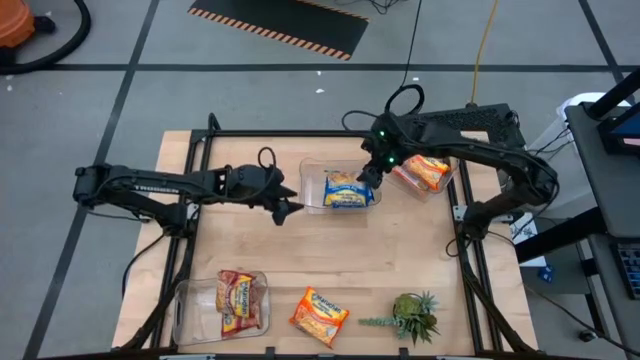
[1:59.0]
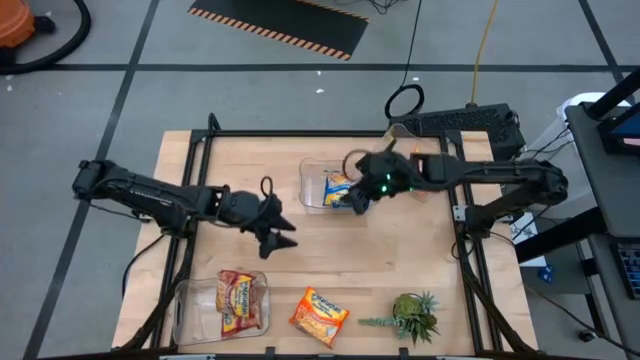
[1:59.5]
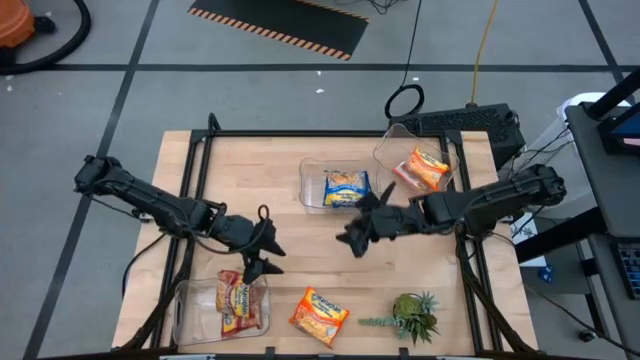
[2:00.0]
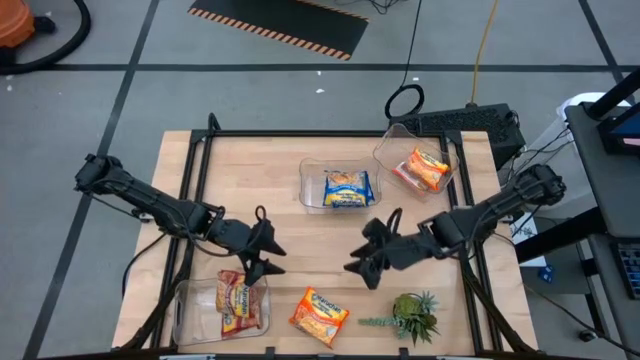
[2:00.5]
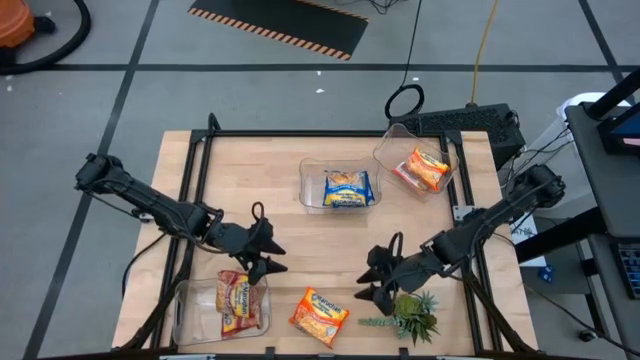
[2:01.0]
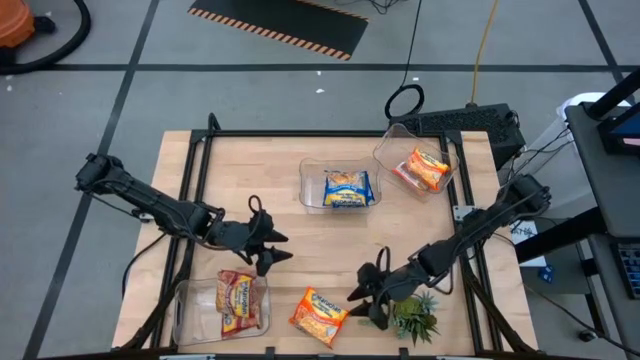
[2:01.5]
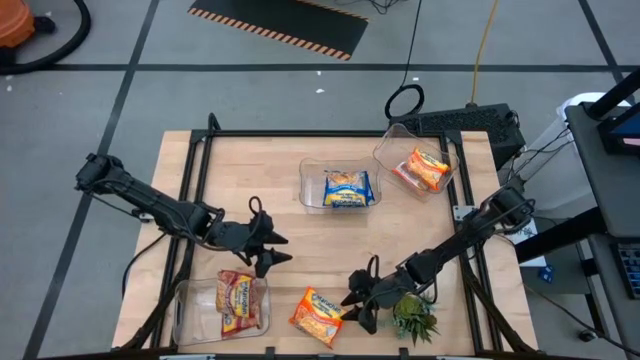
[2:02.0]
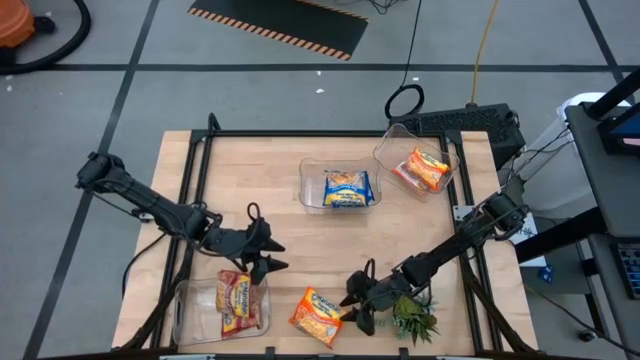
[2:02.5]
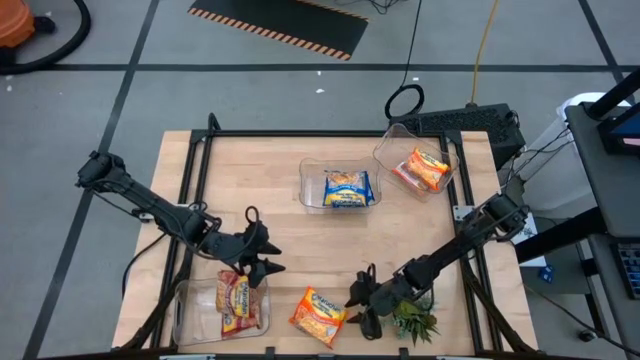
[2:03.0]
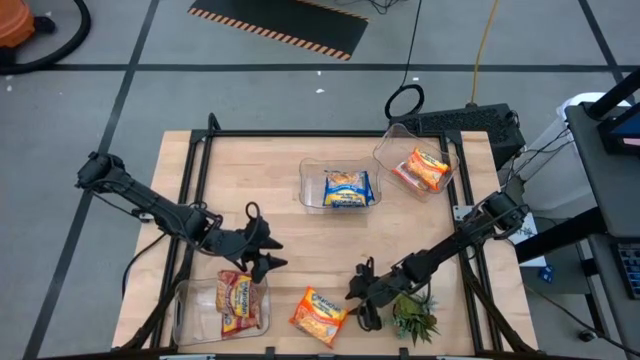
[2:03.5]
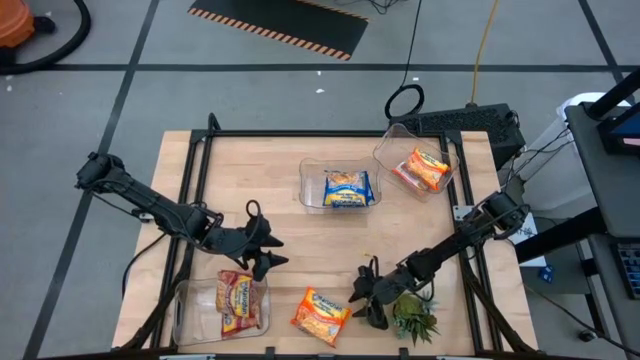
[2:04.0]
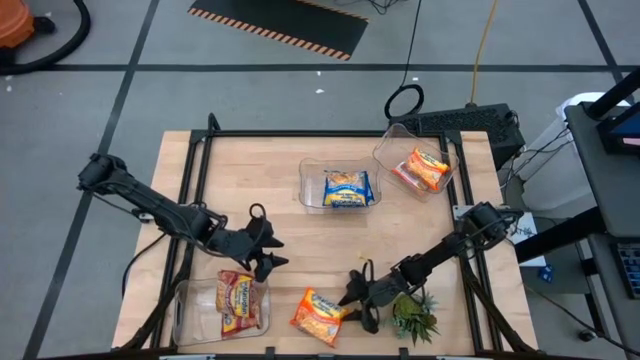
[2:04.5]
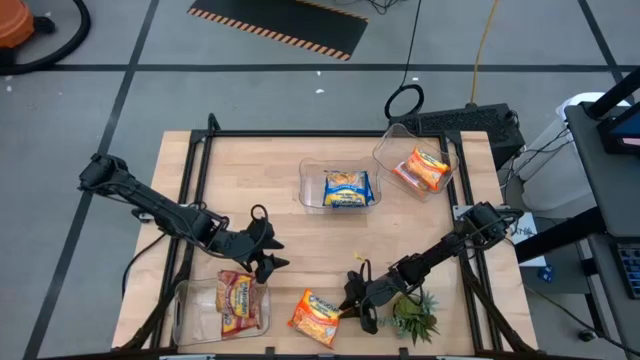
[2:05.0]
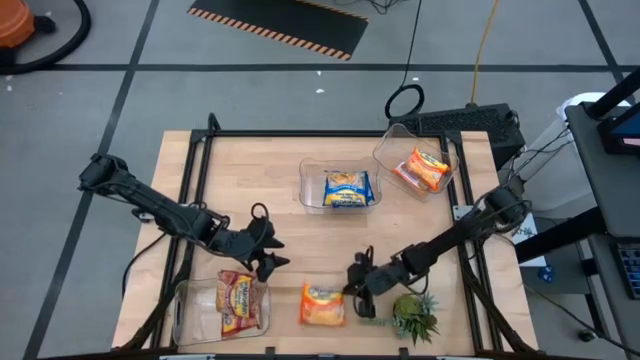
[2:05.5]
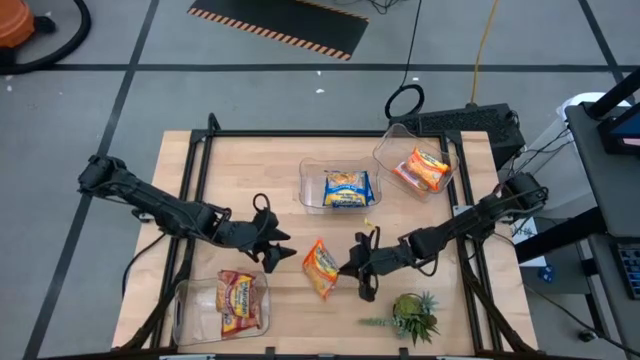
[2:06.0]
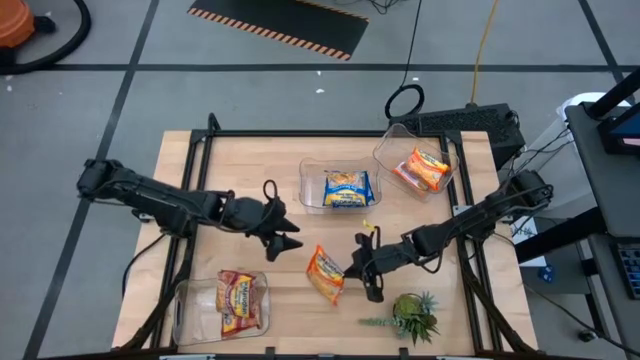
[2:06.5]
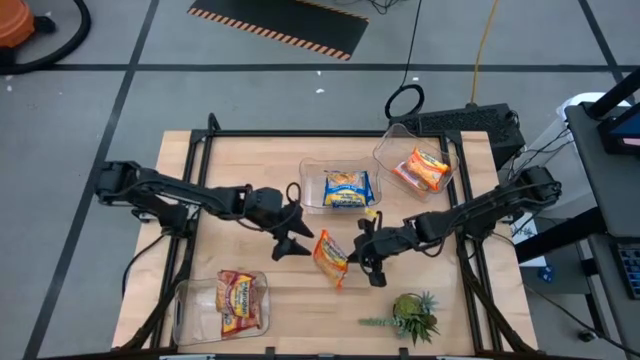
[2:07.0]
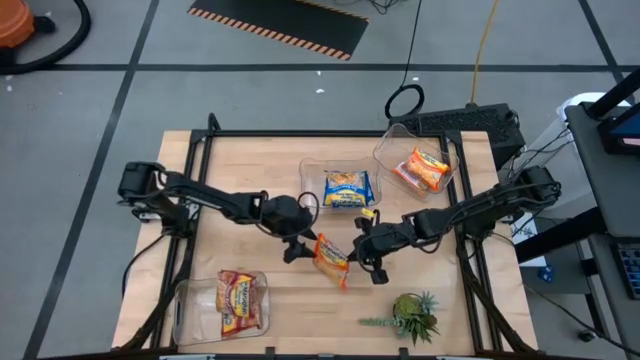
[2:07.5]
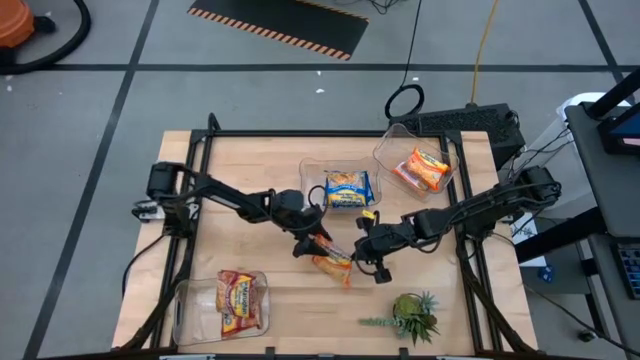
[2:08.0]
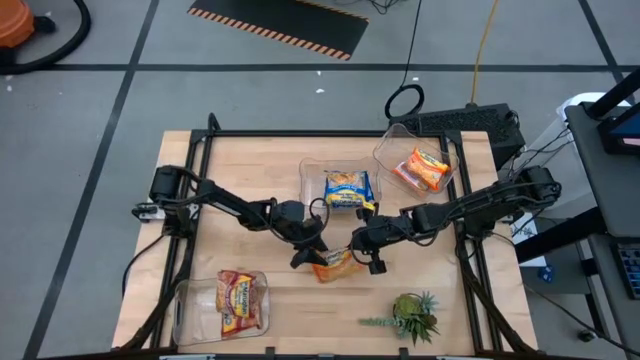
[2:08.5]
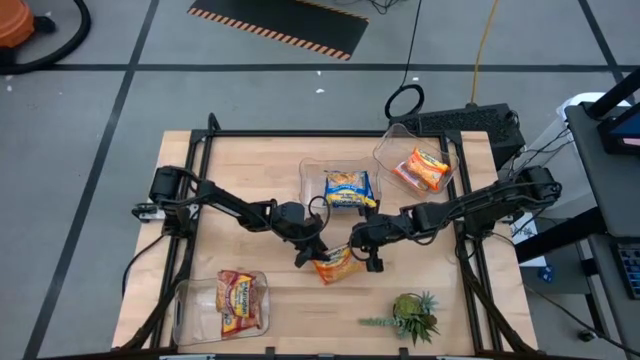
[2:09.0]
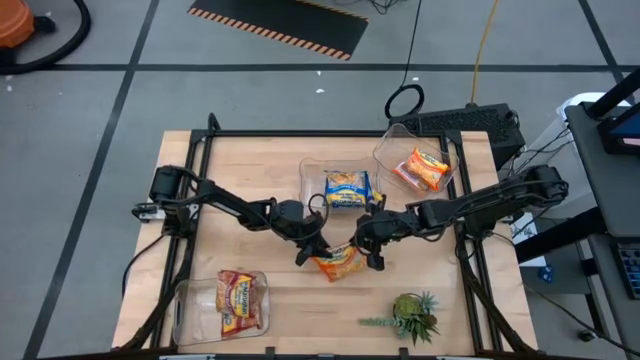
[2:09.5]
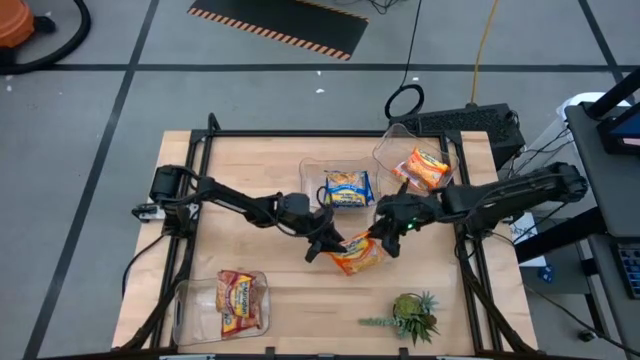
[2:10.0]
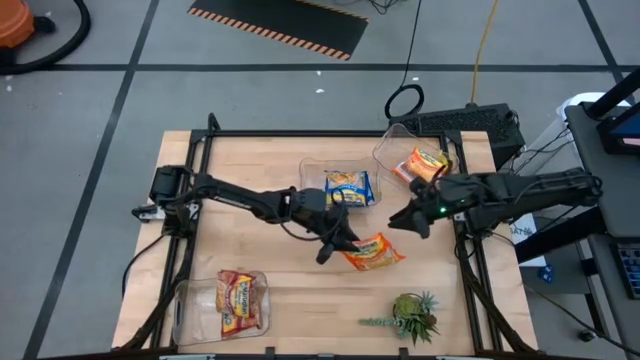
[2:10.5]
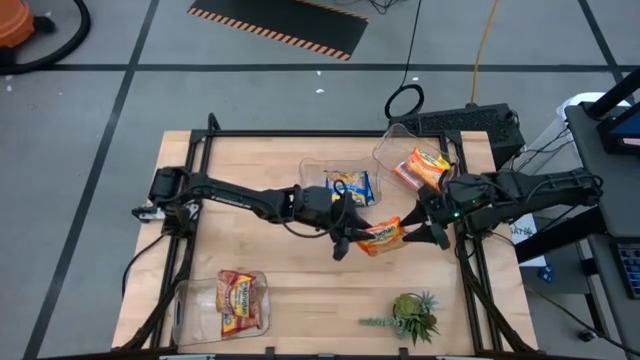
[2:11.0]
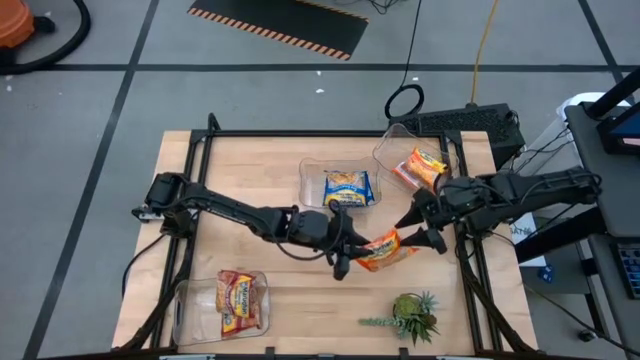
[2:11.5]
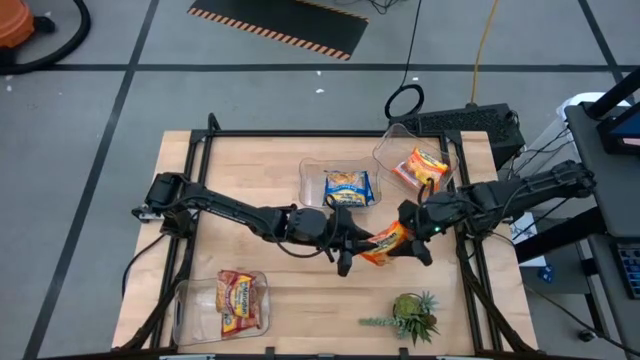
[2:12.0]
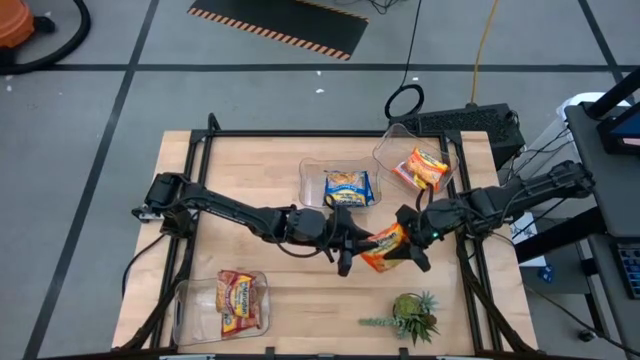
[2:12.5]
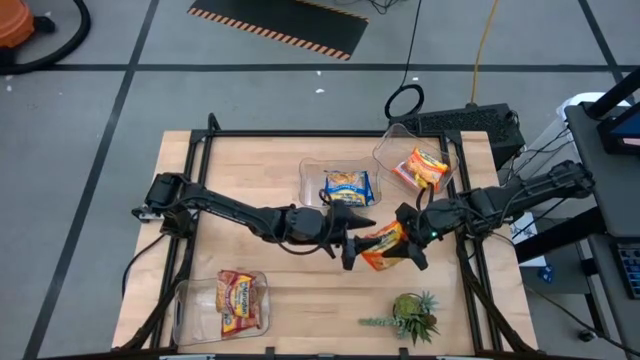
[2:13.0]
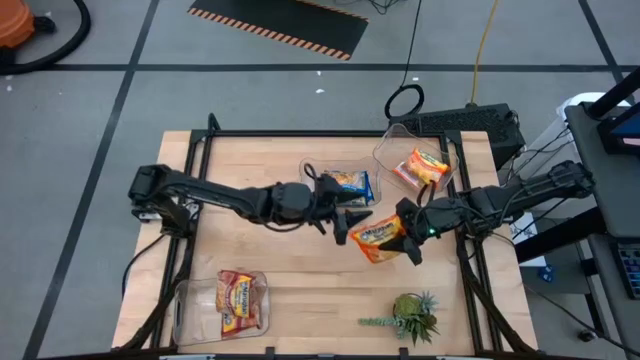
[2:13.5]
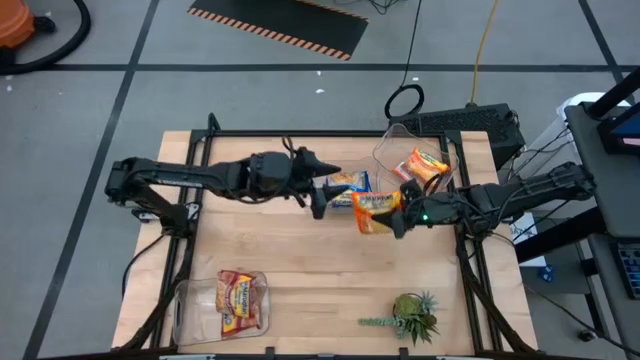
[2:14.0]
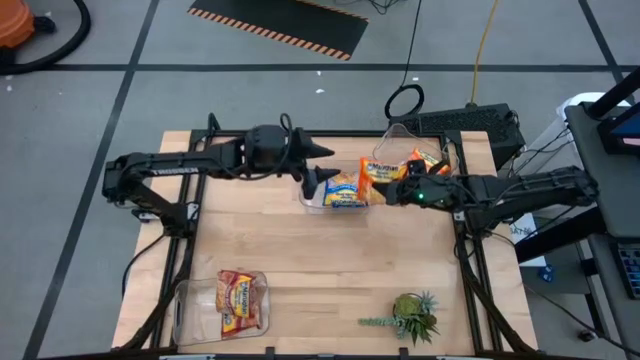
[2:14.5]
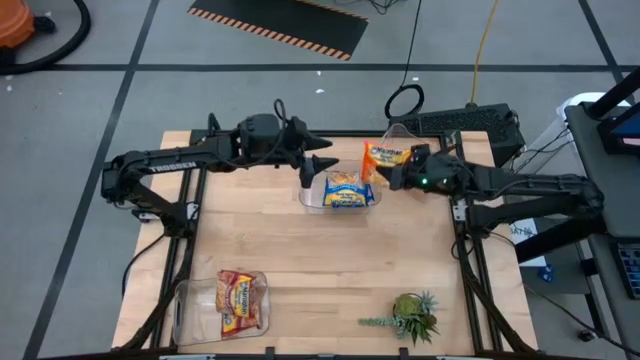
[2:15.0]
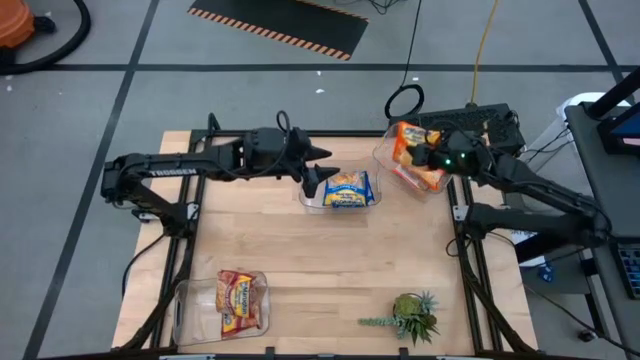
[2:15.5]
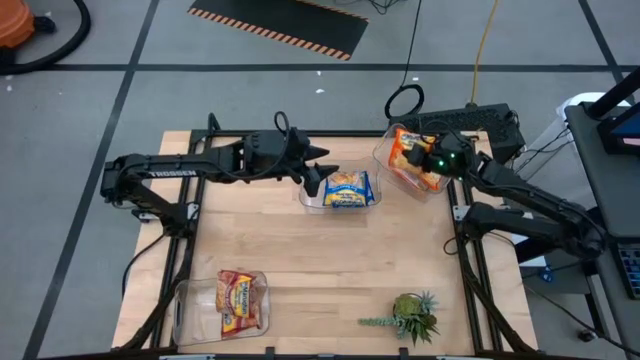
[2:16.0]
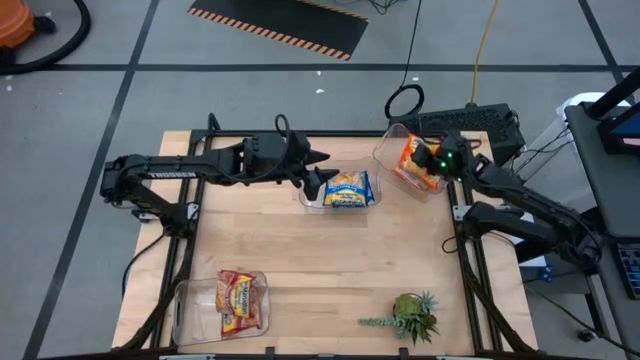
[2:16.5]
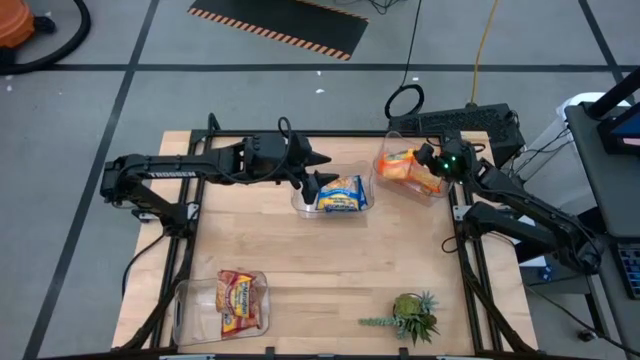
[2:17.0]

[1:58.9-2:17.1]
Task: Sort Maruchan noodles
Put the orange noodle pack into the top right transparent bin

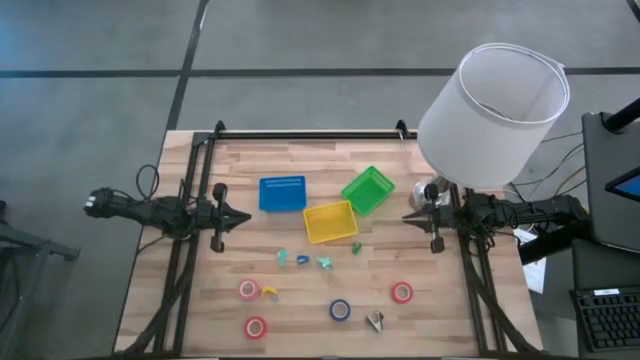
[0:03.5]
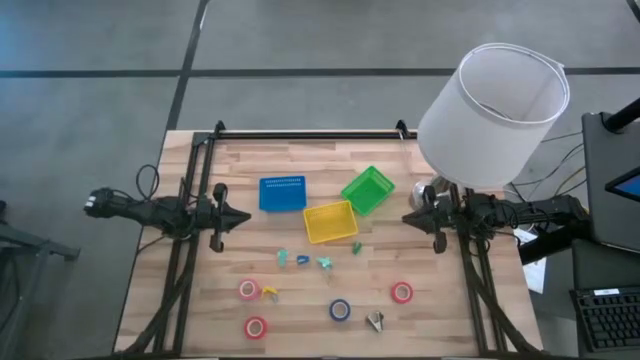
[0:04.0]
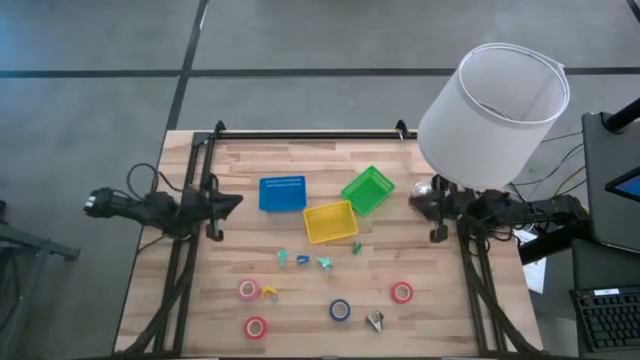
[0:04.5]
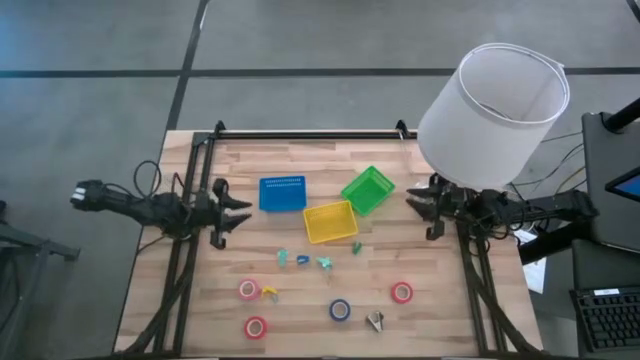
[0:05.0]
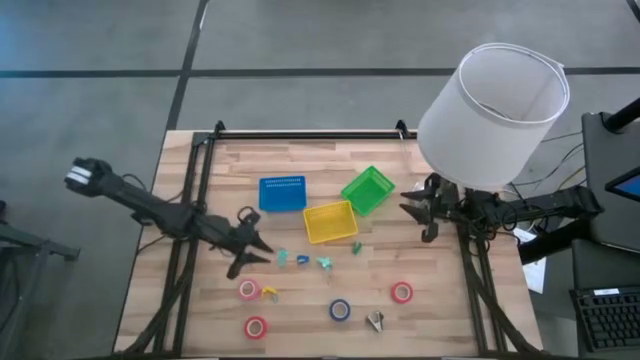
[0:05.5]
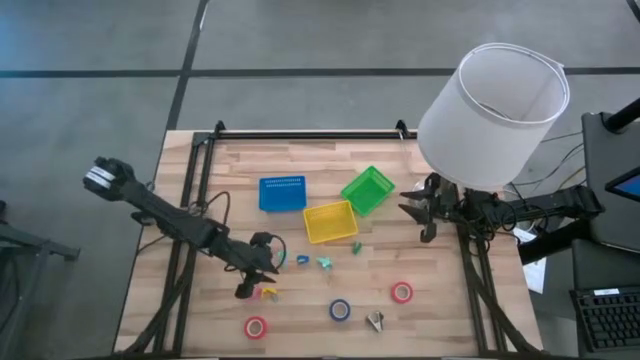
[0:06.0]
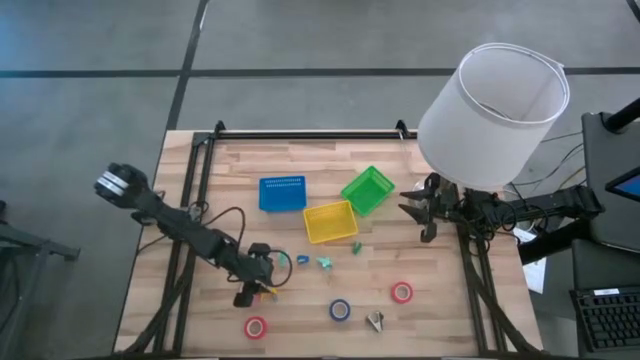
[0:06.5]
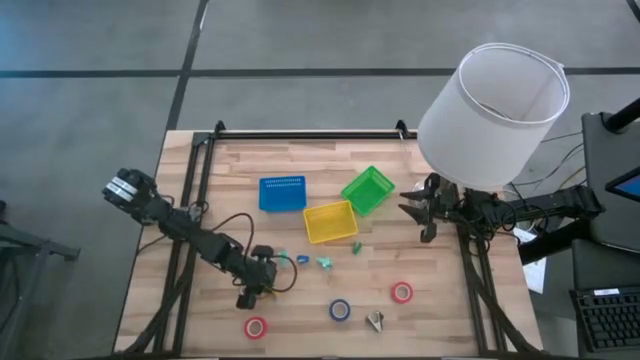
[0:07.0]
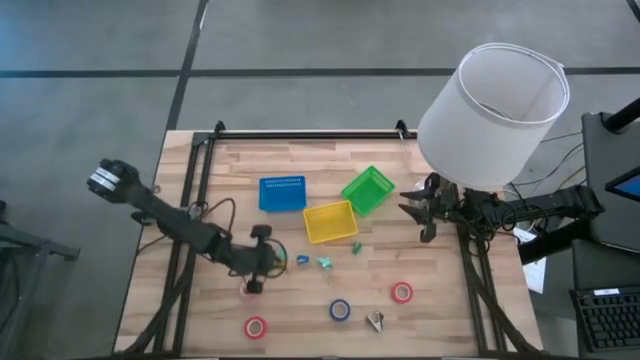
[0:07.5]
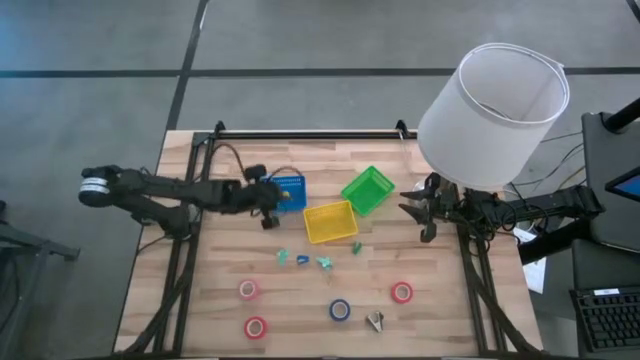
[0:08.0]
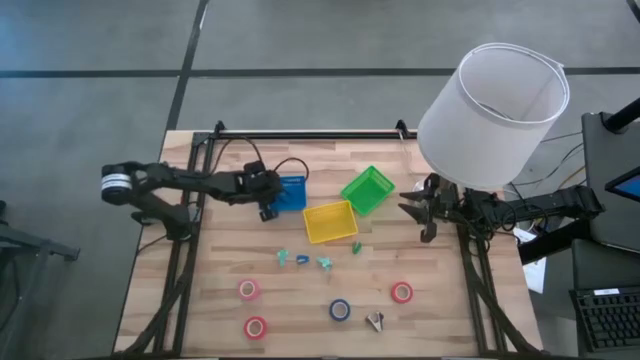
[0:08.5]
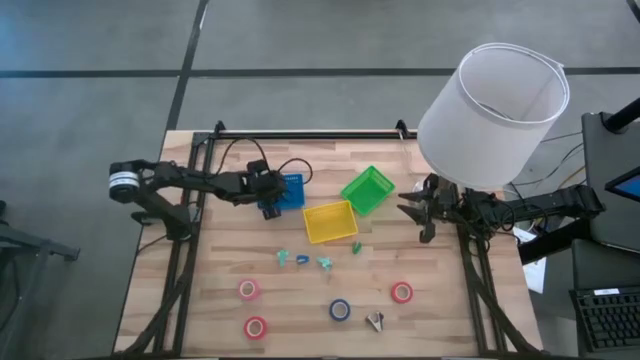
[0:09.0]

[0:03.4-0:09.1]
Task: Pick and place Stapler, Stapler remover, tape
Put the yellow stapler into the blue bin
